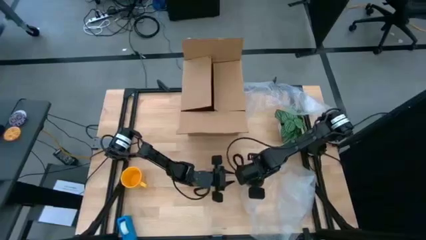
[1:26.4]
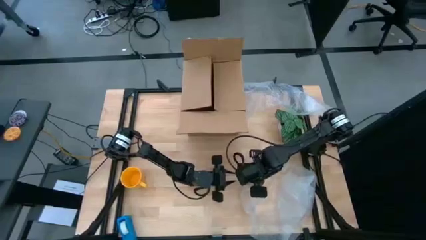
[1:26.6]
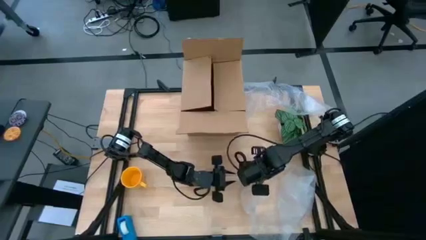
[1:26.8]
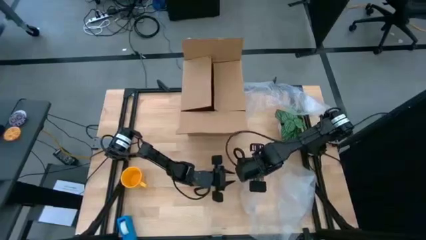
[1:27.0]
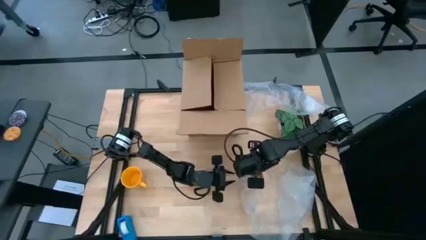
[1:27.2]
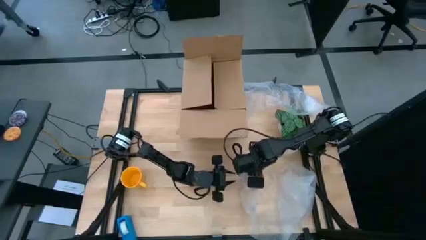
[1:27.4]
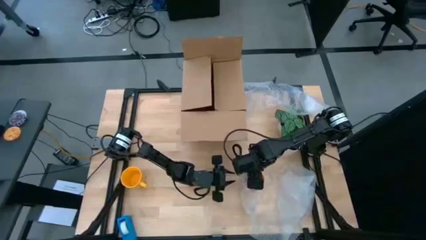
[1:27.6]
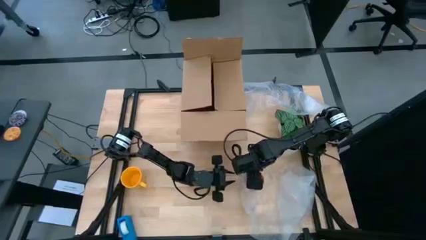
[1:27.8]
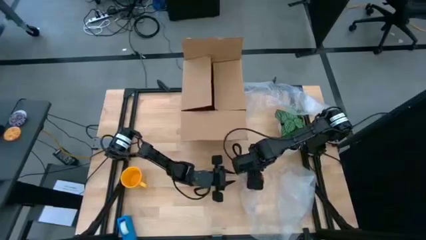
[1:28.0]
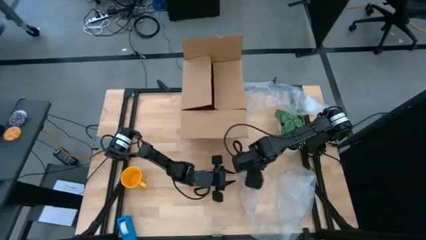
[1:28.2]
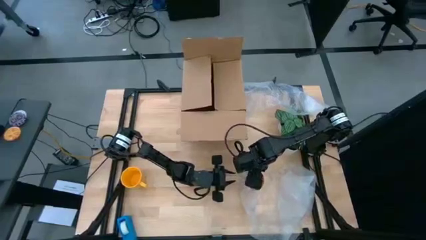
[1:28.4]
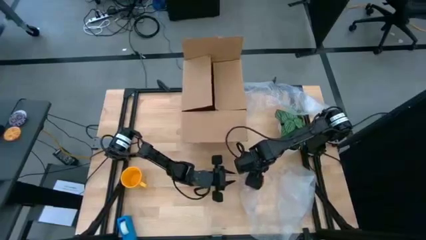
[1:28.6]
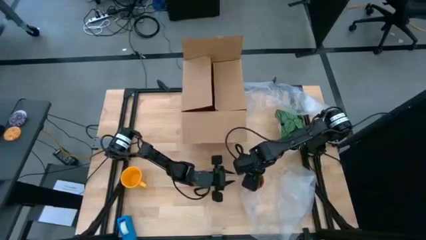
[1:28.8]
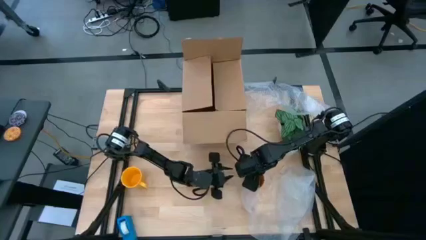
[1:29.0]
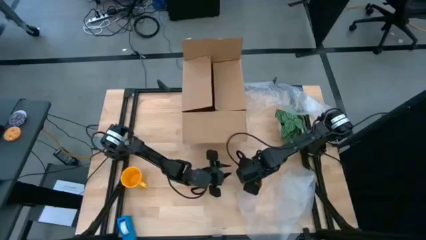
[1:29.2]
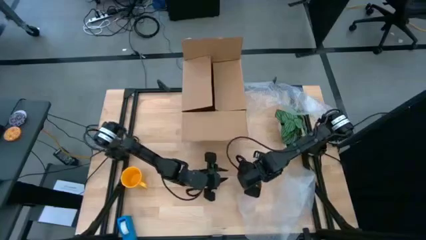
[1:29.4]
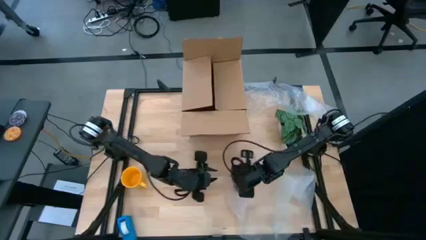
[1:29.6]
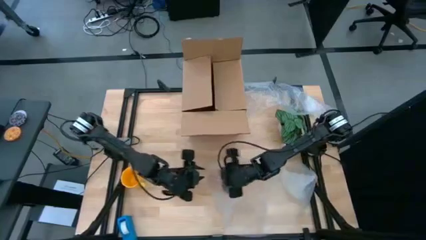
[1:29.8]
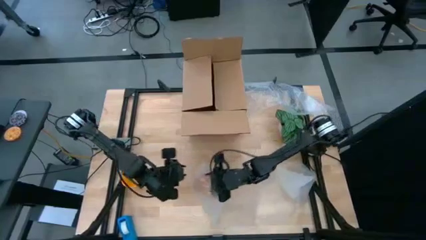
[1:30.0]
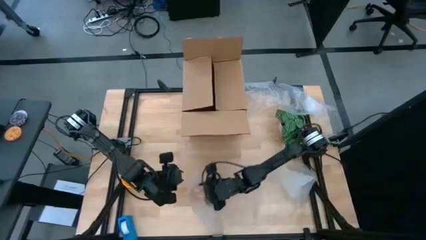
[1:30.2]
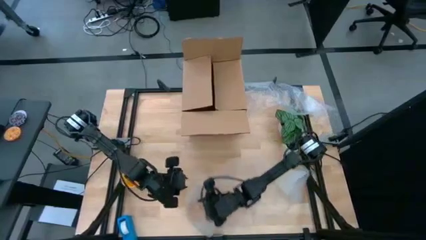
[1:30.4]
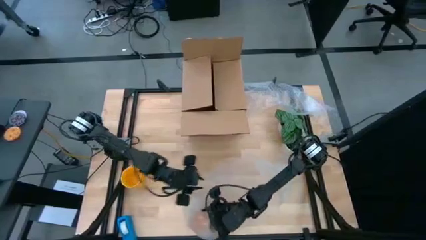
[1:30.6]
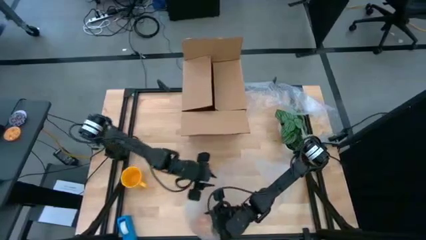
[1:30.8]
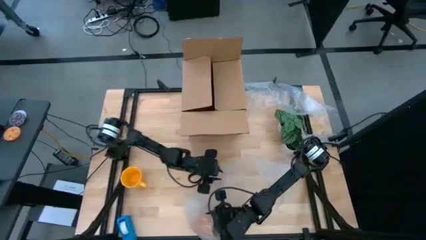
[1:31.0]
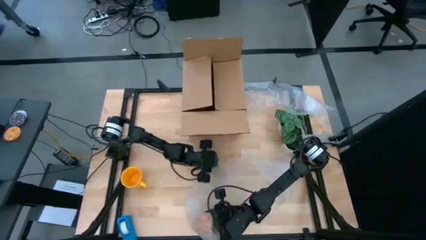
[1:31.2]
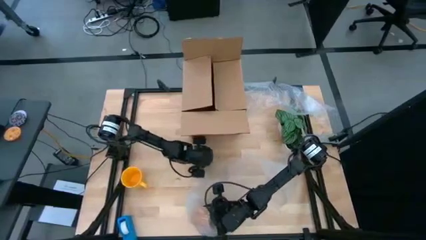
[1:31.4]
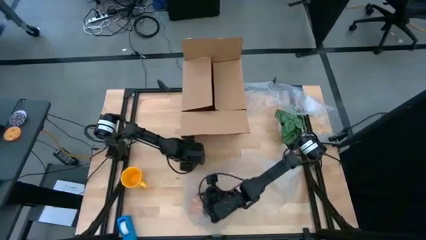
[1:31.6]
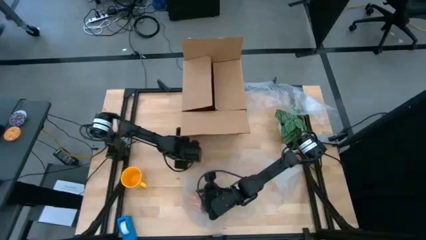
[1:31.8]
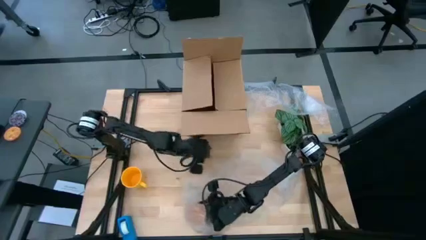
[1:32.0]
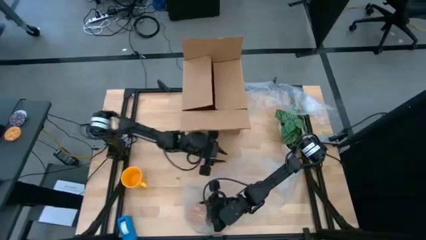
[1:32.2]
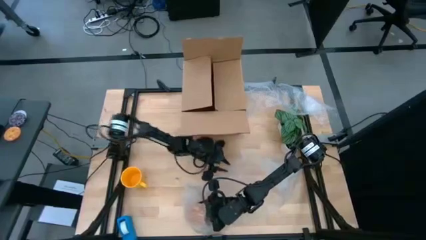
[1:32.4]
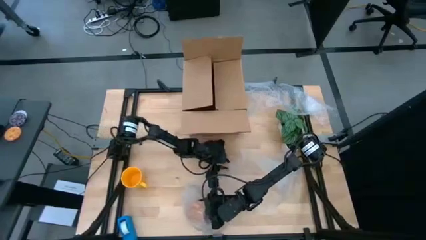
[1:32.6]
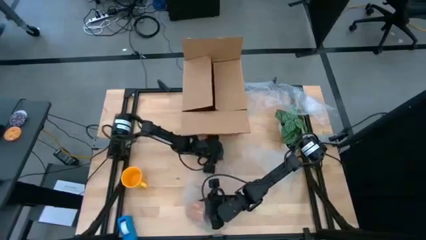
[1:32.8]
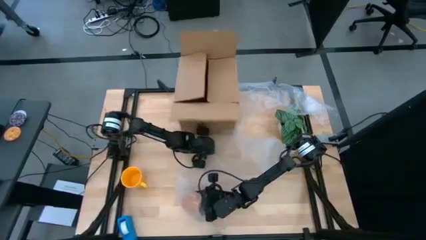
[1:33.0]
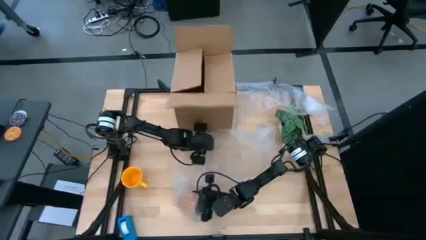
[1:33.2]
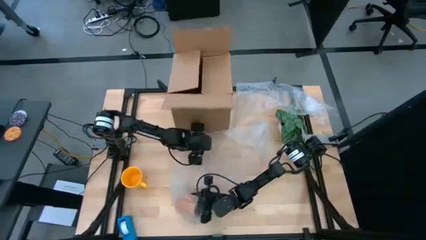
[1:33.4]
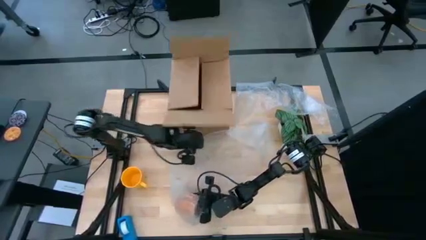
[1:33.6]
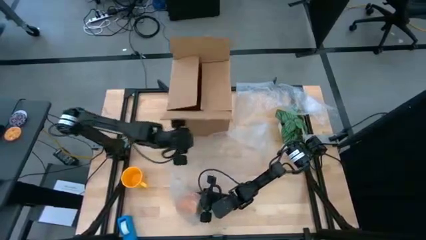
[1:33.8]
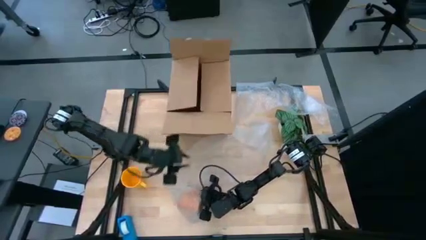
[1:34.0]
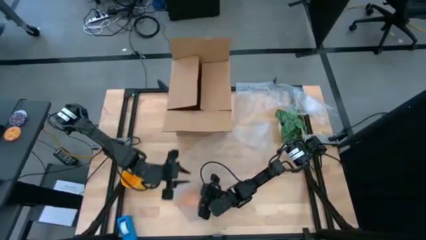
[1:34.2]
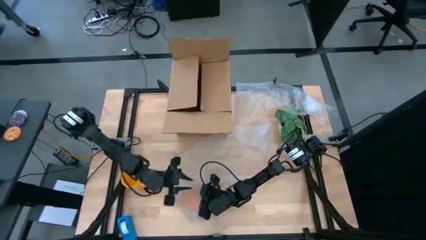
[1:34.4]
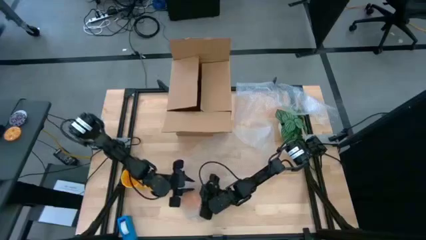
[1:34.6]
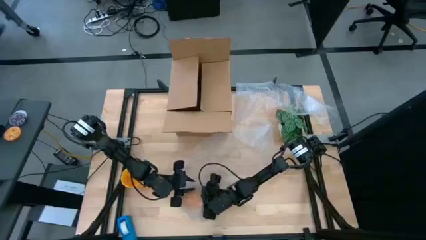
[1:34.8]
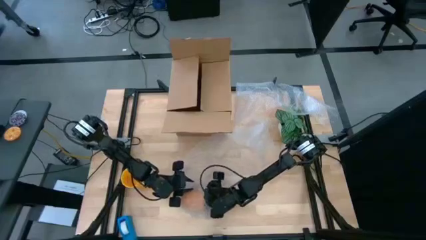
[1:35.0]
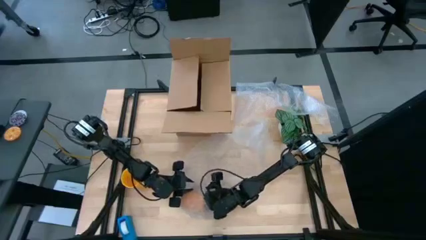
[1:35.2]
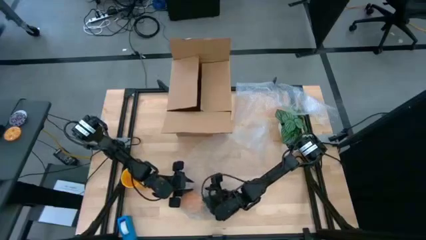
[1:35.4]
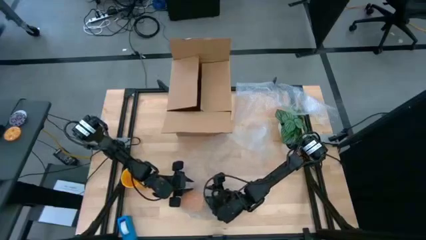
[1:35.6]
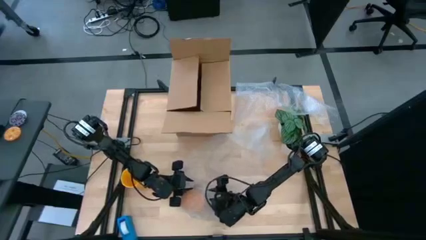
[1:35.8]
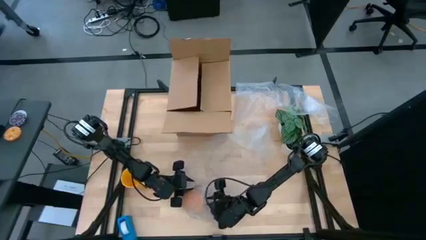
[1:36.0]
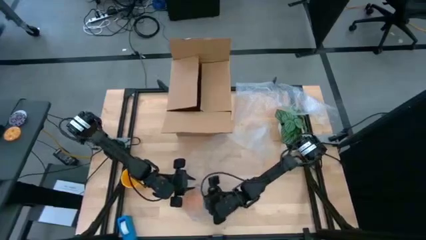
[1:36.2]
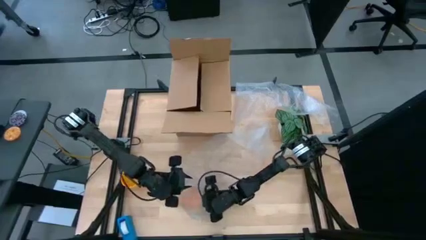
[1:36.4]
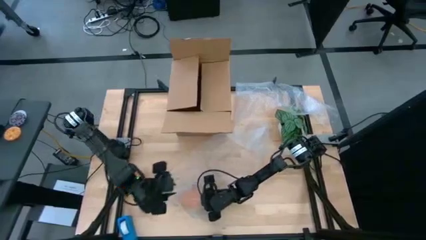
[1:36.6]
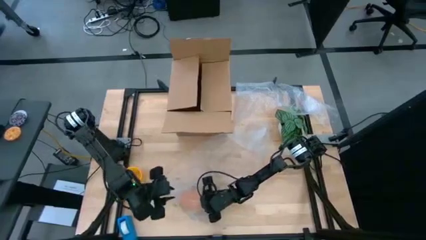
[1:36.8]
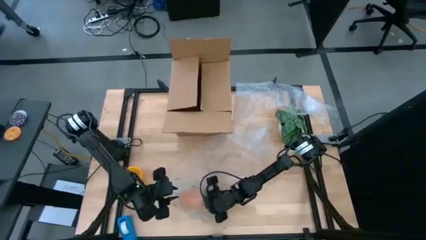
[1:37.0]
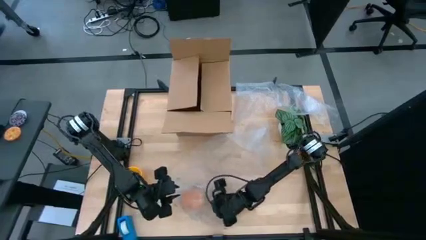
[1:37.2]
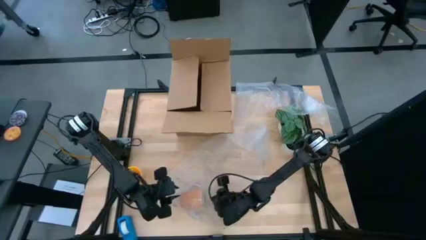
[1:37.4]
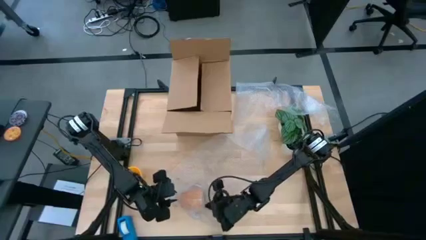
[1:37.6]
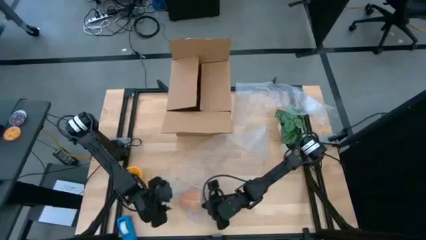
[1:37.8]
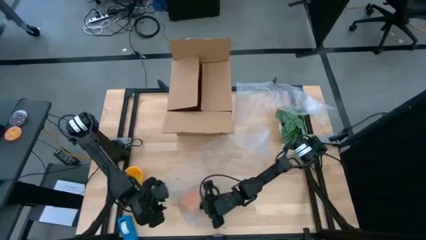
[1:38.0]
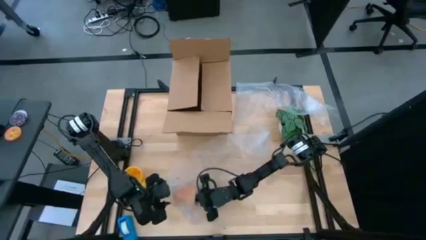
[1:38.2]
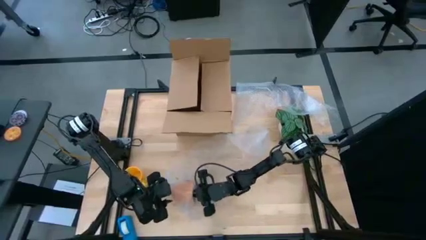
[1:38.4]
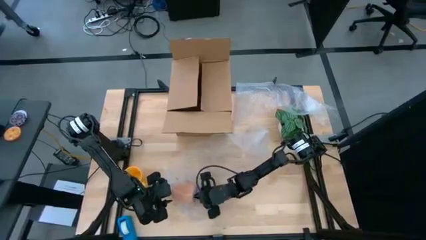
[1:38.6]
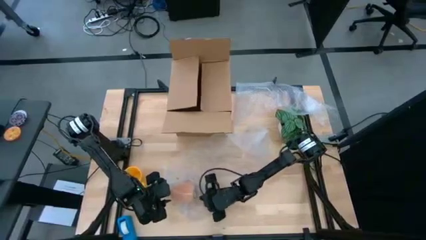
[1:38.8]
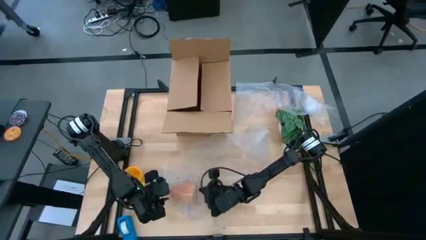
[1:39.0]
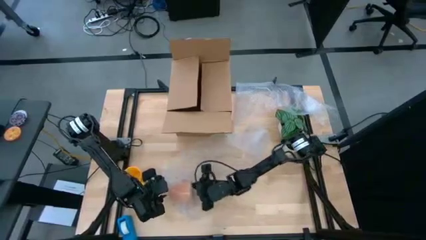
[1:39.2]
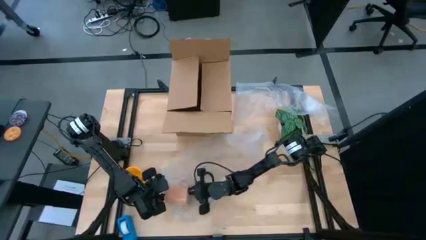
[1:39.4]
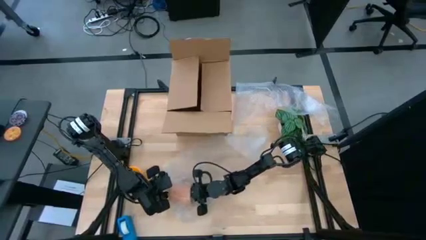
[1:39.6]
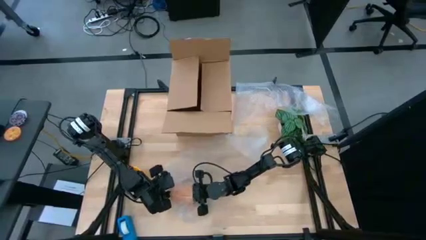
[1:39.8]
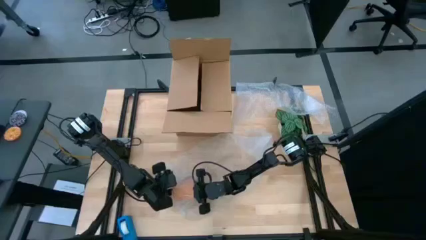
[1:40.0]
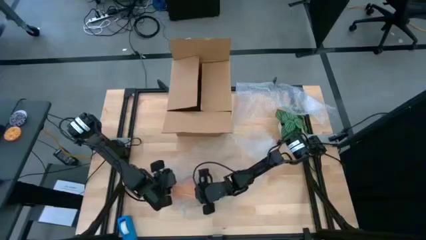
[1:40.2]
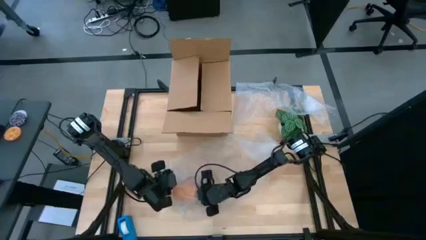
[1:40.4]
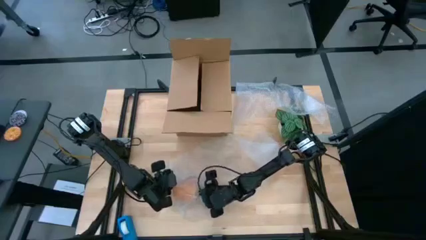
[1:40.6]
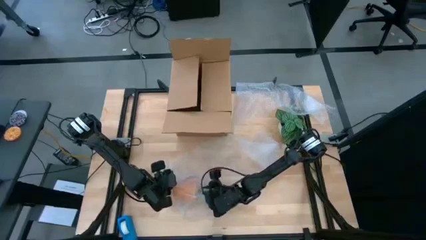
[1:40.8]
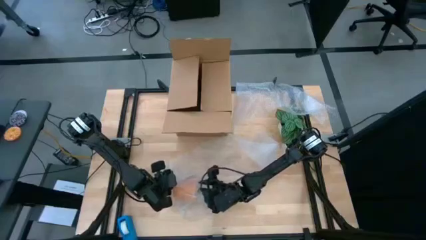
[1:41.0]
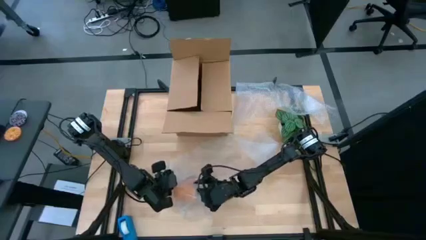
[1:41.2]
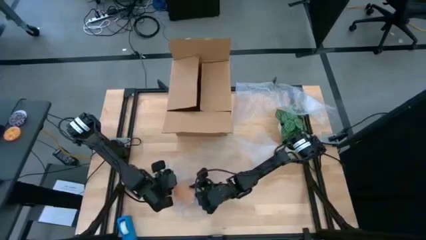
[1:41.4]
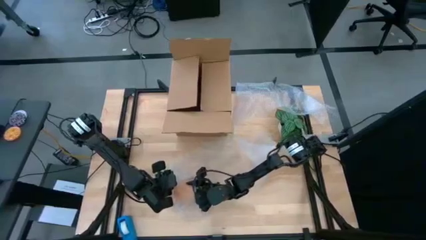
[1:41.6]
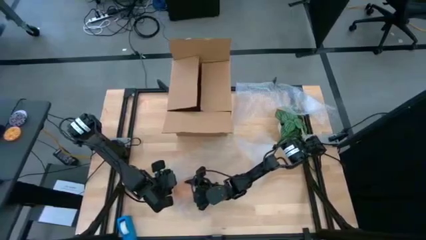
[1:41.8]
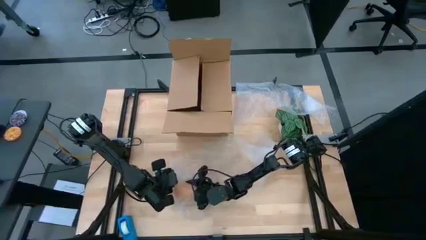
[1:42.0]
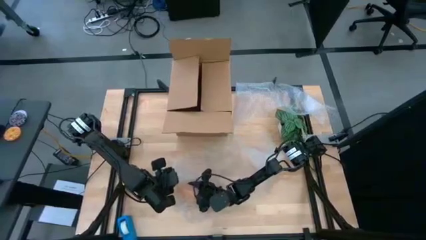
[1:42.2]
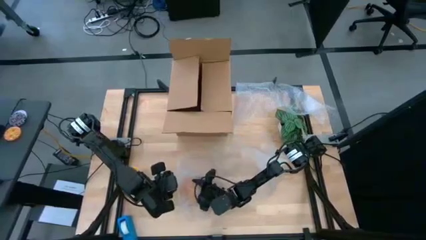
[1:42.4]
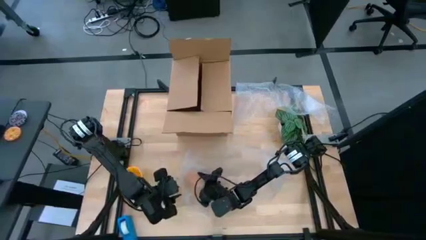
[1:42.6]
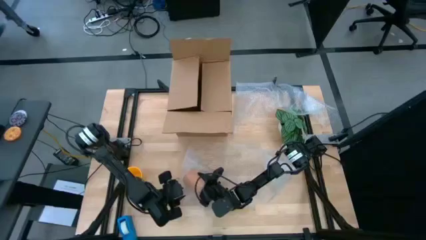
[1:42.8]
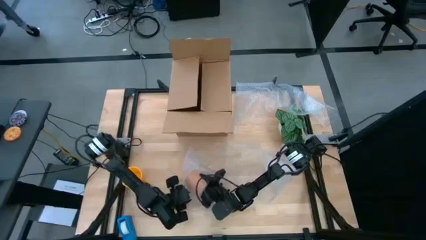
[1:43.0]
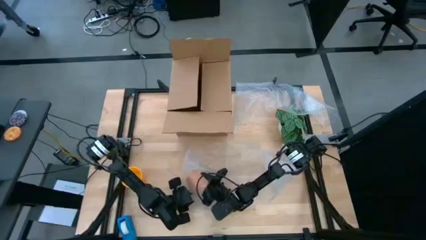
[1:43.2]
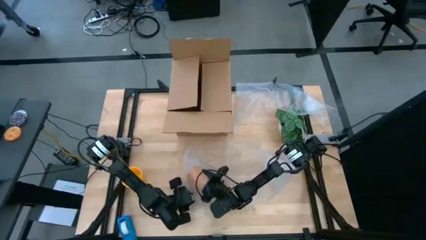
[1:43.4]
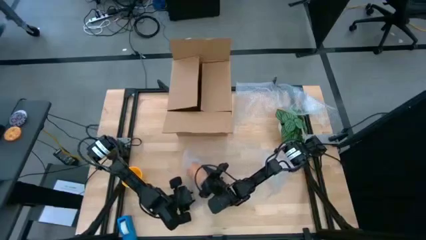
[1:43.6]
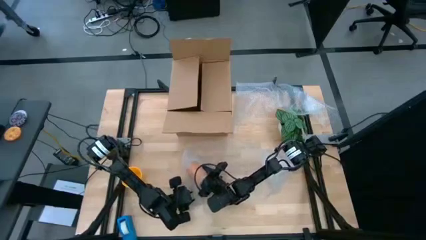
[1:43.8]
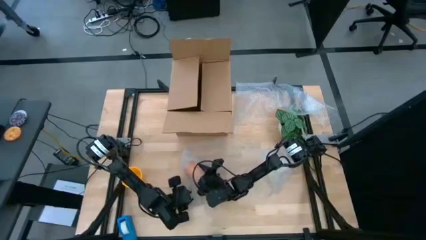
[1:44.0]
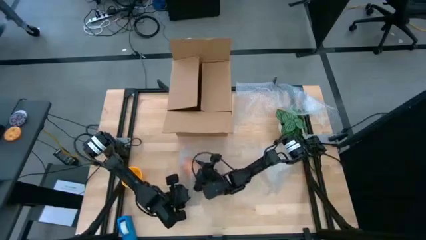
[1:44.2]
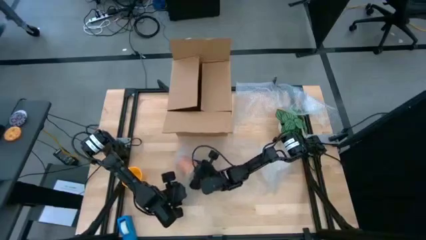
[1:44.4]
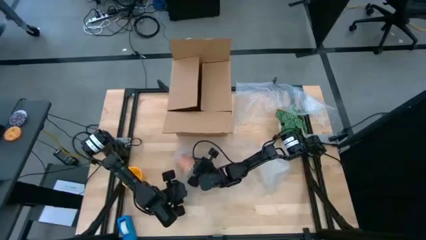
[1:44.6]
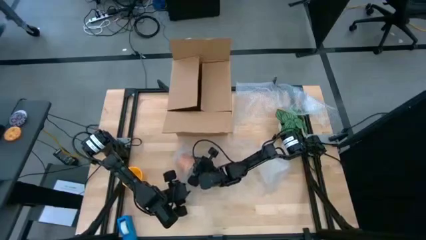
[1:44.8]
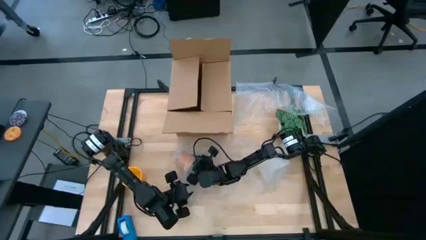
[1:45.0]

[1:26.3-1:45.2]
Task: wrap mug
Wrap the orange cup with the bubble wrap
